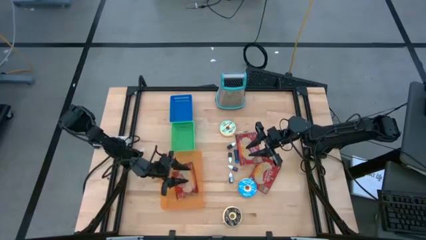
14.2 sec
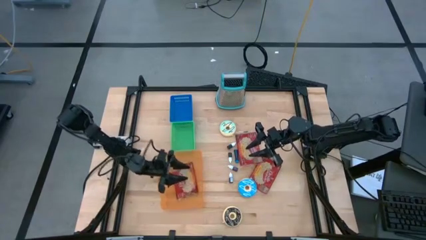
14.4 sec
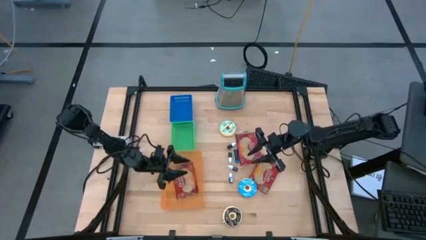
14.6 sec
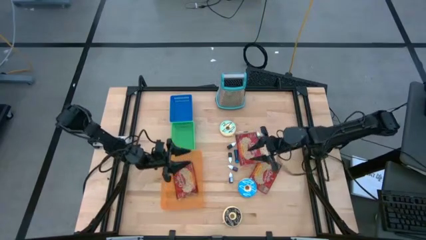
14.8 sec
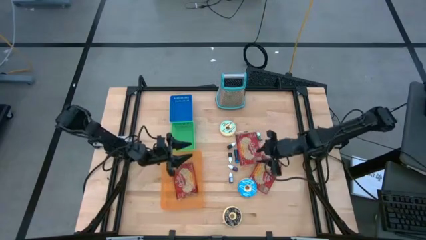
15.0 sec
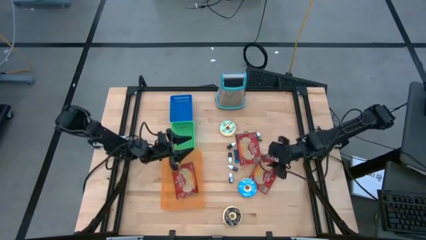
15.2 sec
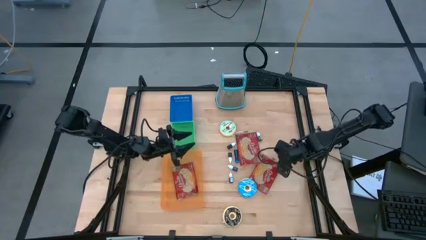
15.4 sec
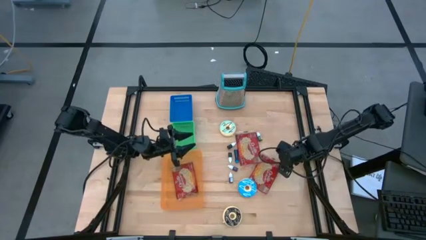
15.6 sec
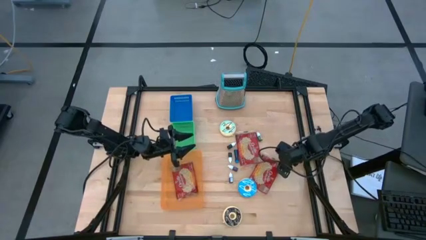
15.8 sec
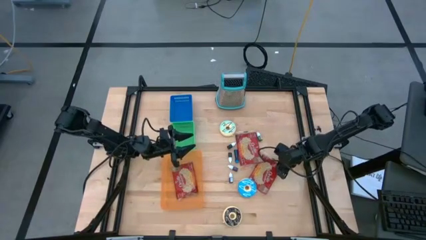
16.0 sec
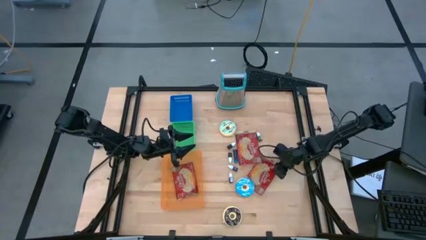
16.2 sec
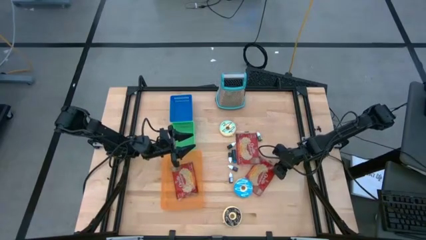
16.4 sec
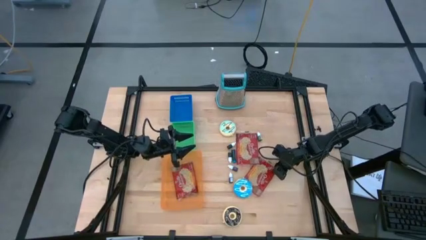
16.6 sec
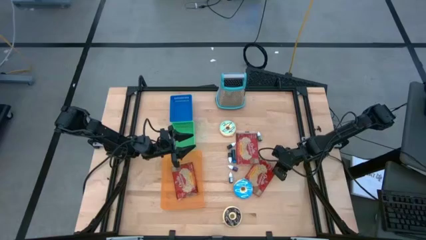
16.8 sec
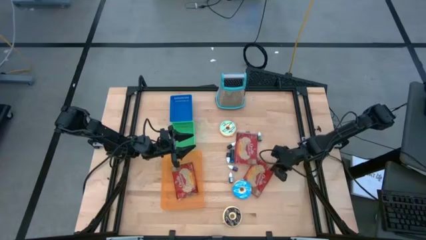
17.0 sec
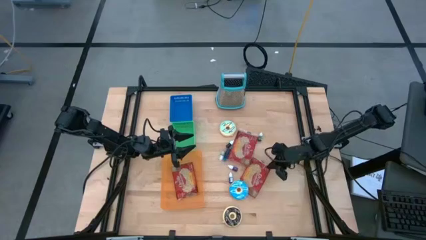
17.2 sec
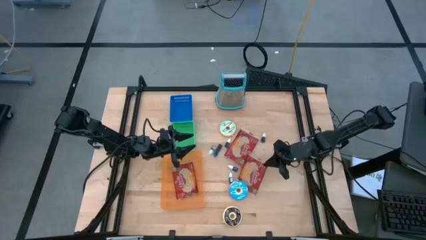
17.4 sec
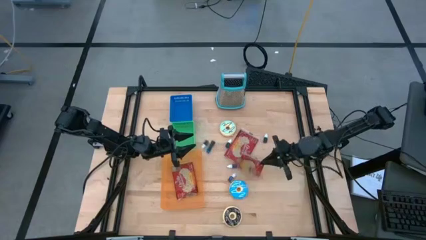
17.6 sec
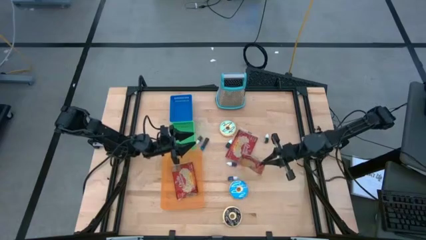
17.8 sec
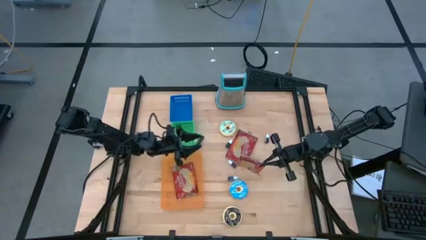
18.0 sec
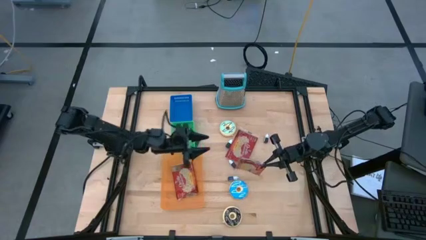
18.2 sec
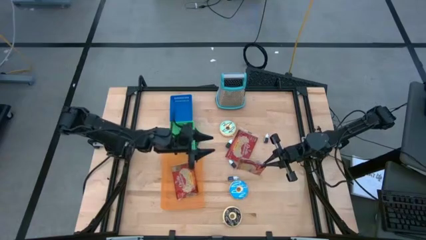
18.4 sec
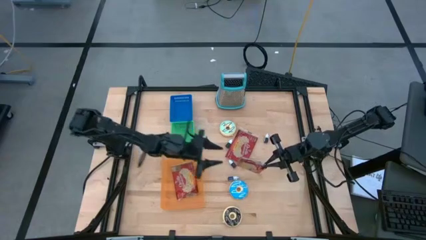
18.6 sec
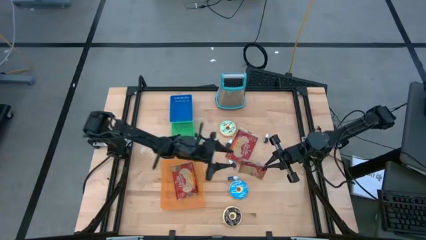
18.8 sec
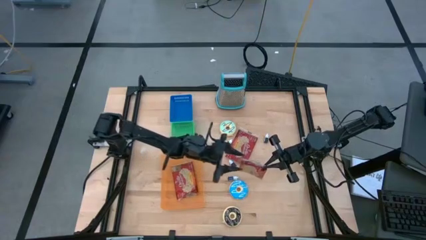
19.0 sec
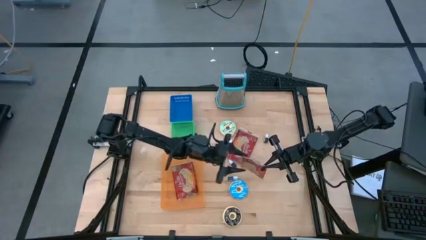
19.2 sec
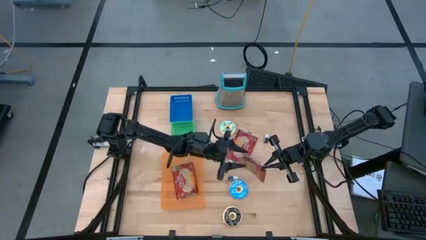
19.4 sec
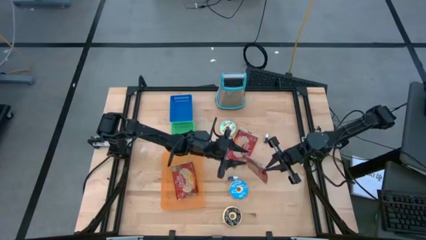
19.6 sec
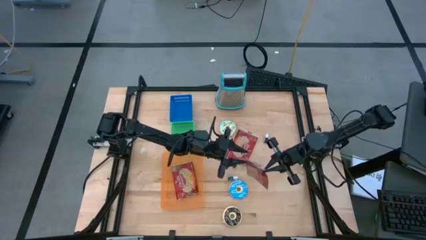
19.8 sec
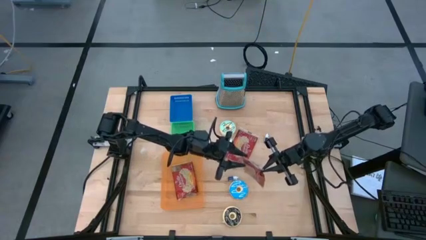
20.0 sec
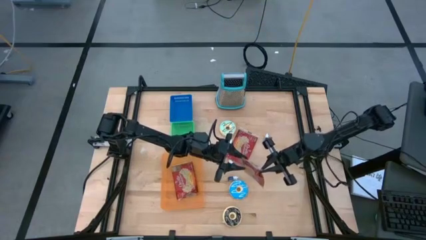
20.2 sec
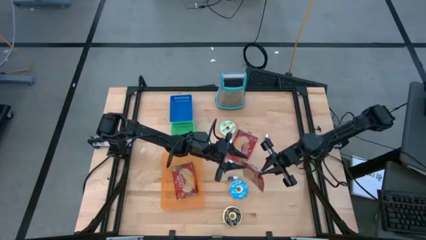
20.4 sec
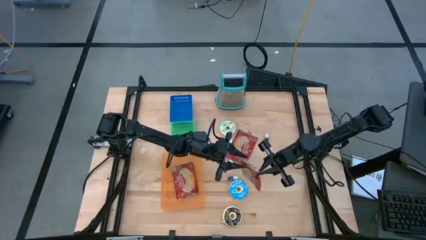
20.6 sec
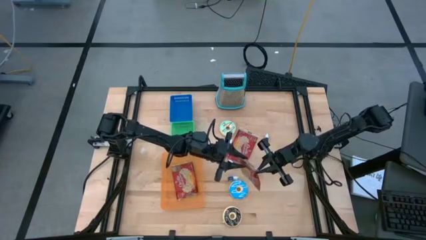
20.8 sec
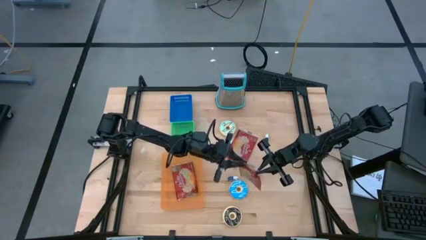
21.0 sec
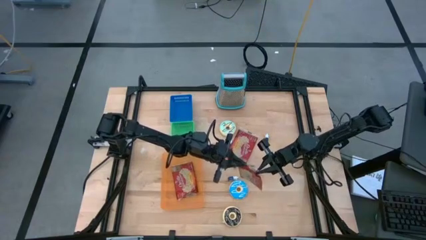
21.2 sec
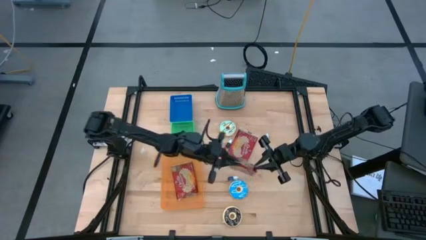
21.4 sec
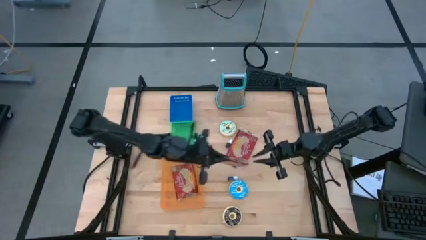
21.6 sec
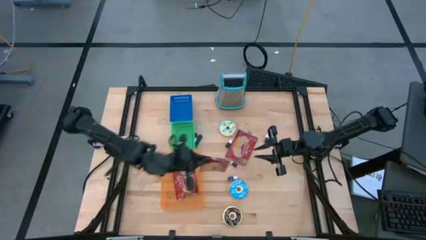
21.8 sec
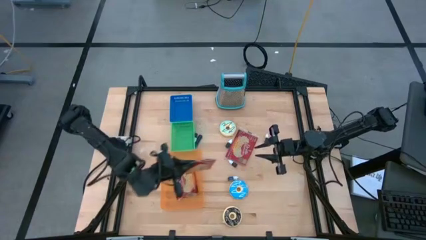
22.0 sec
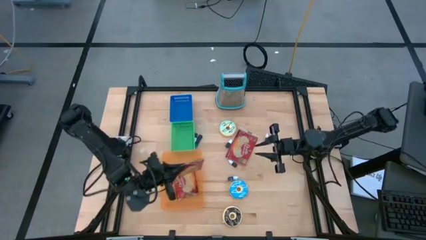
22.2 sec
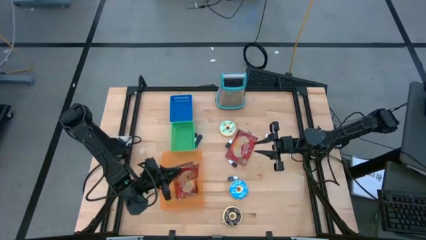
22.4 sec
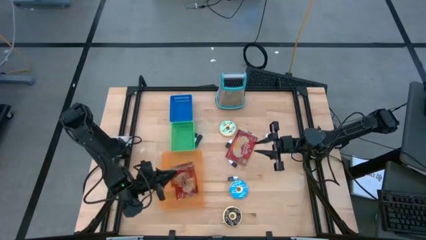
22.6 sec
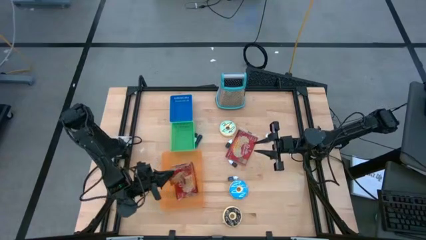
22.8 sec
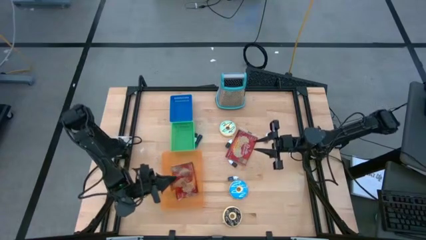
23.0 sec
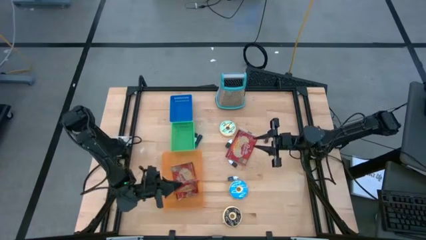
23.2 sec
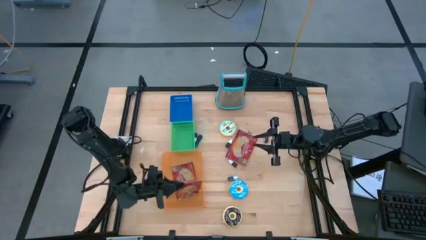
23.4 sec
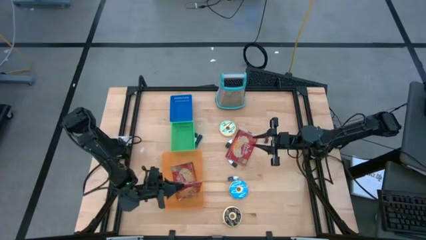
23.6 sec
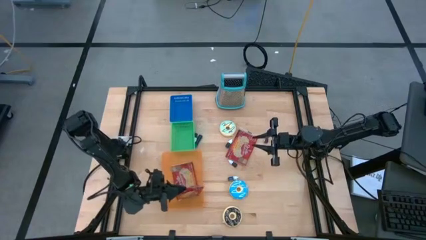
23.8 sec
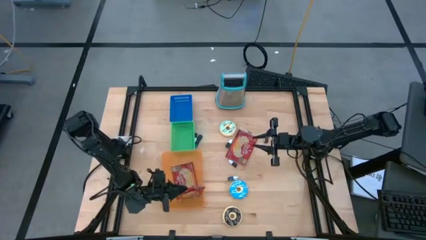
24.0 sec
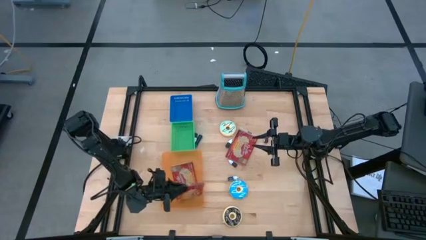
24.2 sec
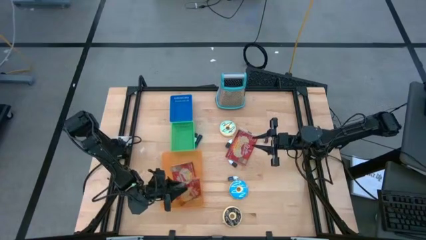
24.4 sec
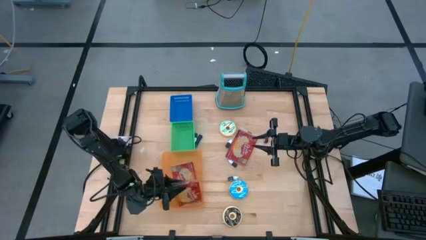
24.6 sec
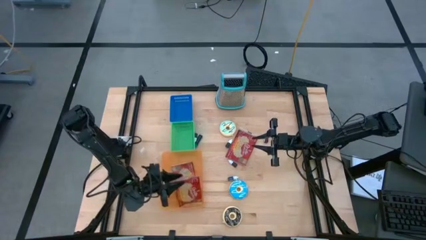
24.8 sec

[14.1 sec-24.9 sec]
Put the bottom red popcorn bag into the orange bin

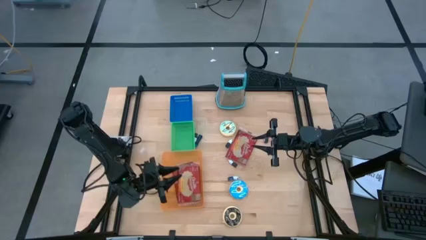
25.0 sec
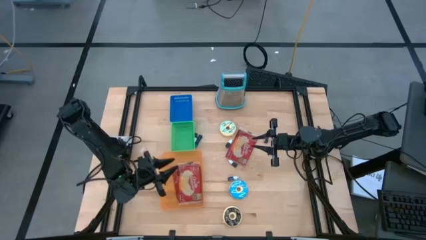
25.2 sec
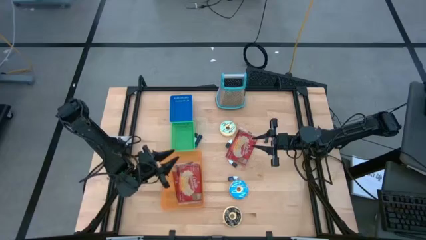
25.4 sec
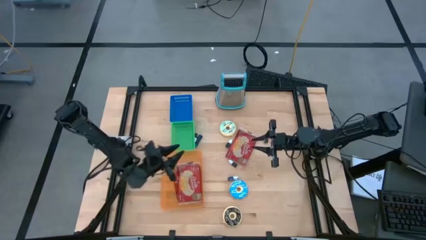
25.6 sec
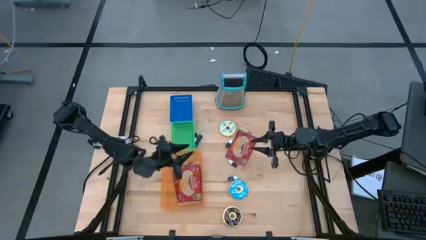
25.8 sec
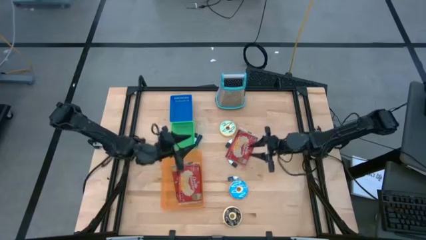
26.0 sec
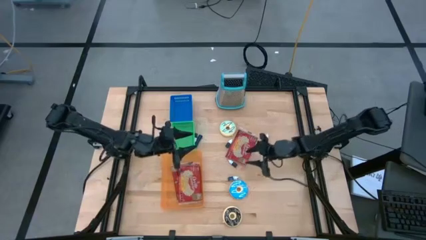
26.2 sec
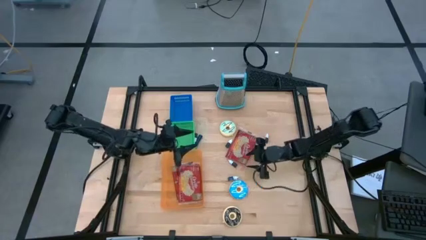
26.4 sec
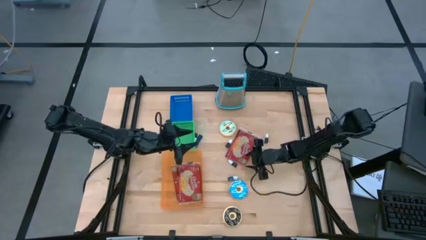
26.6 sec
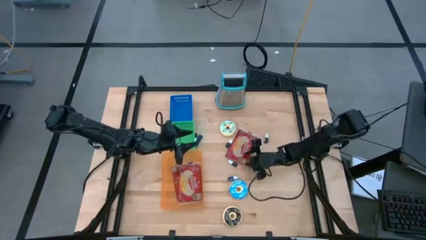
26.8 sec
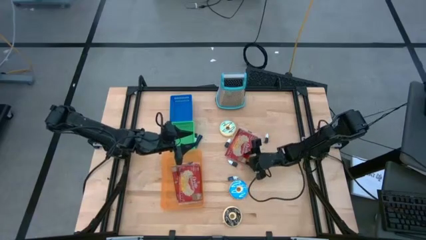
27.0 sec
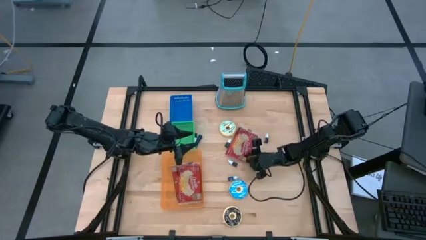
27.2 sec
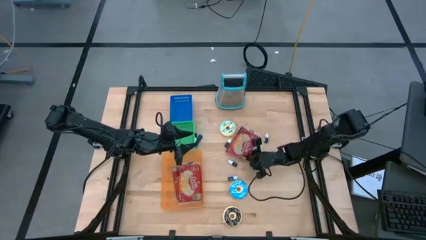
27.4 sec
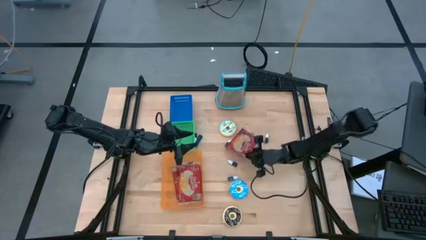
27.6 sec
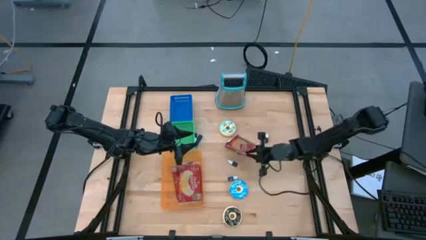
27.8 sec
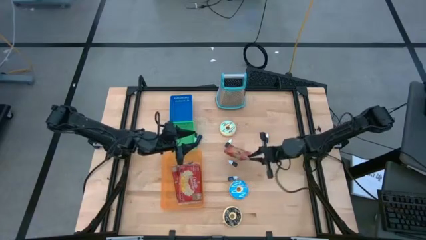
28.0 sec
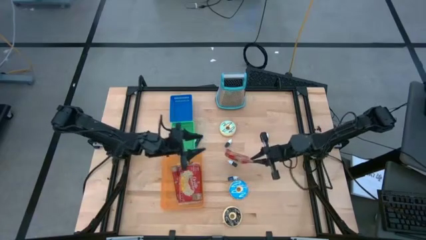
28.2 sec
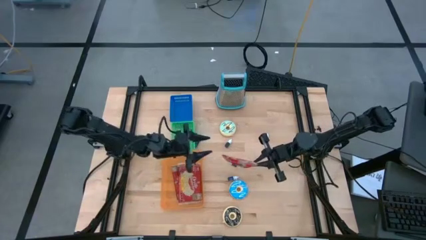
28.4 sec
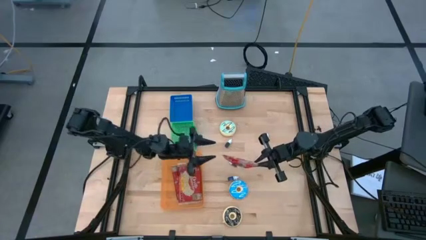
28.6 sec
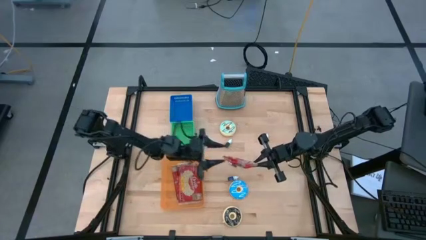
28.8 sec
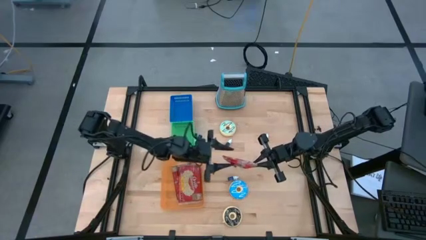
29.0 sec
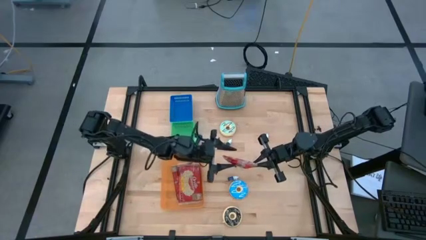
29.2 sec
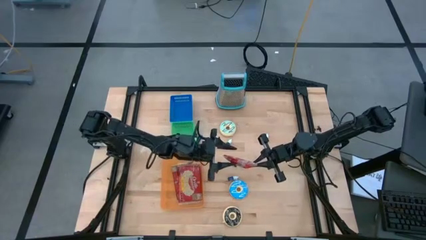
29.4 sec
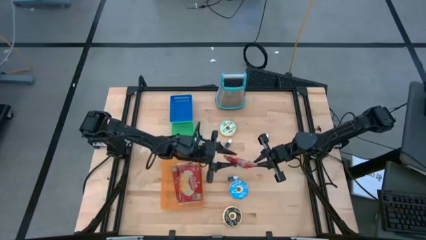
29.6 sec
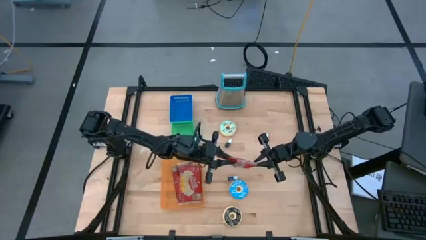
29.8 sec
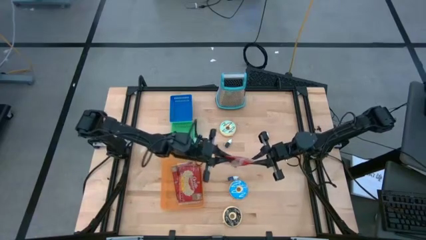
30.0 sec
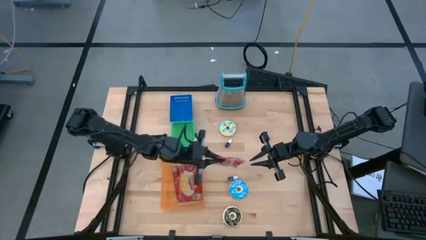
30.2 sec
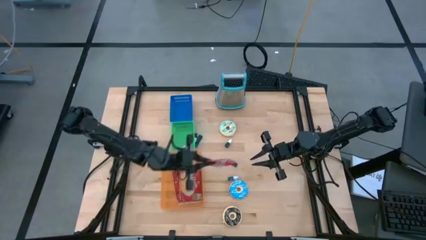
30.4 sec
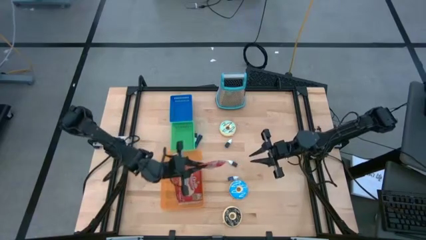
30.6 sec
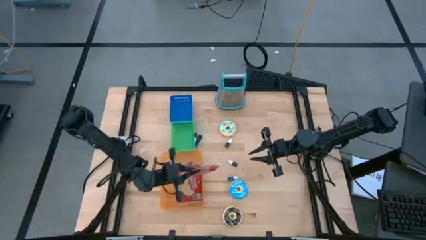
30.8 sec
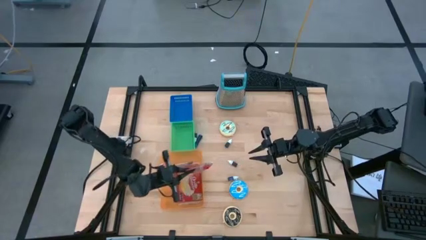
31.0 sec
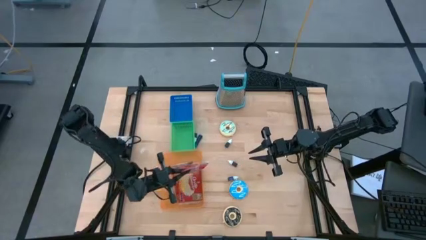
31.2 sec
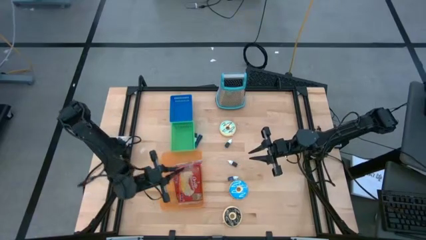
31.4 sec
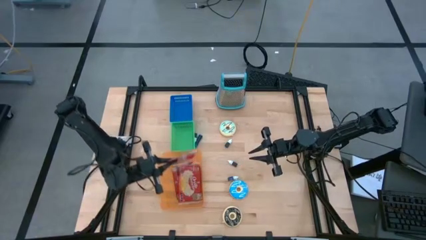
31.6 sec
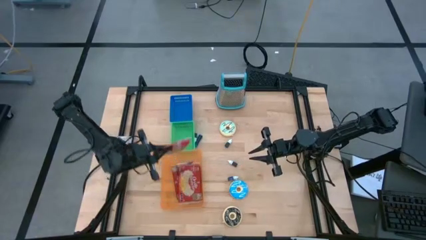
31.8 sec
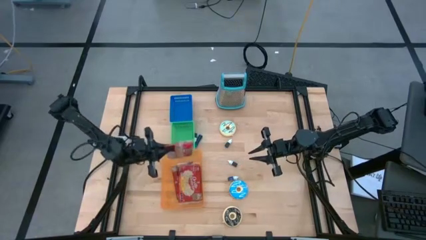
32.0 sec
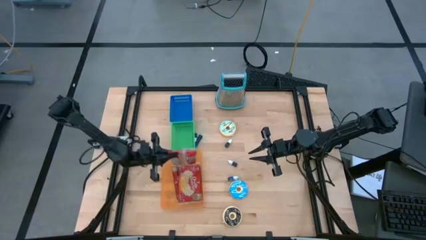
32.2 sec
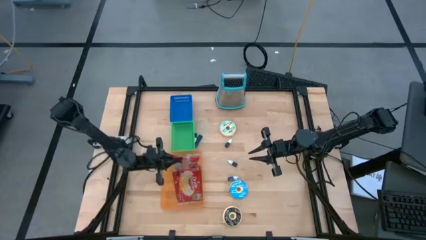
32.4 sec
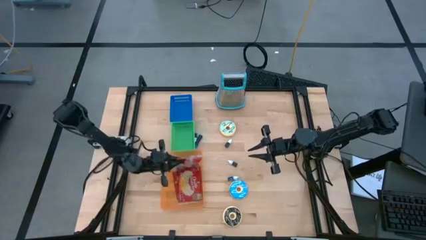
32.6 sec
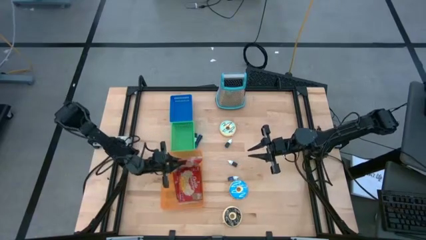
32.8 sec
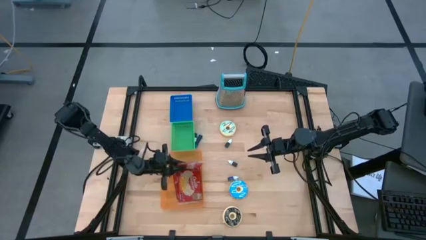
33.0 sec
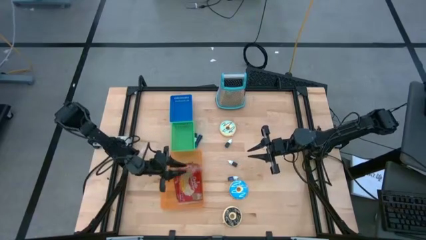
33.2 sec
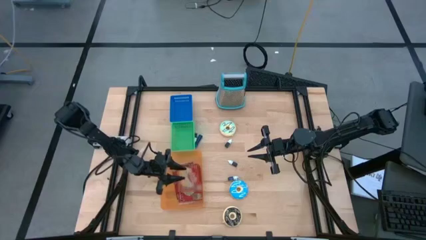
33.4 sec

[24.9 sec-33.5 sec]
Put the red popcorn bag into the orange bin
